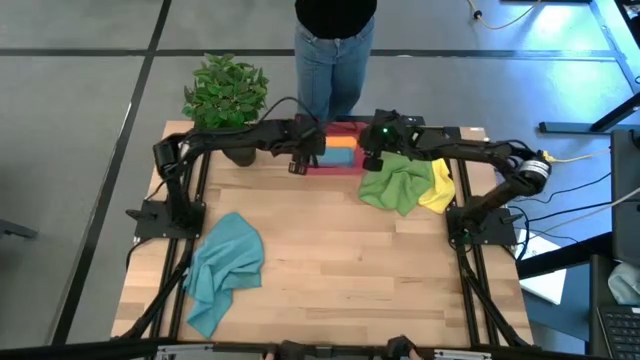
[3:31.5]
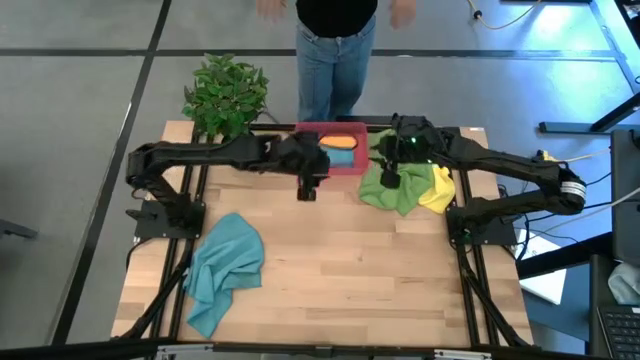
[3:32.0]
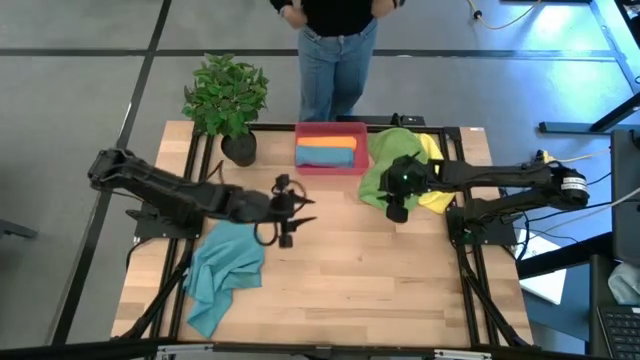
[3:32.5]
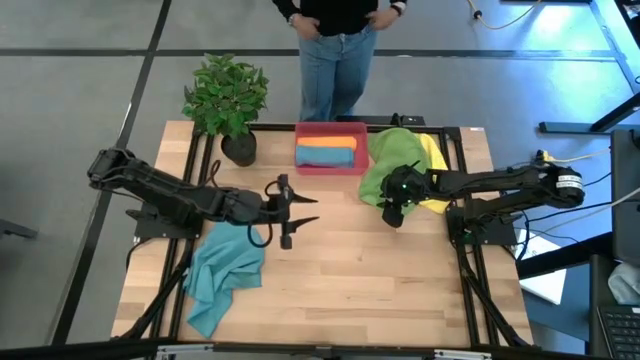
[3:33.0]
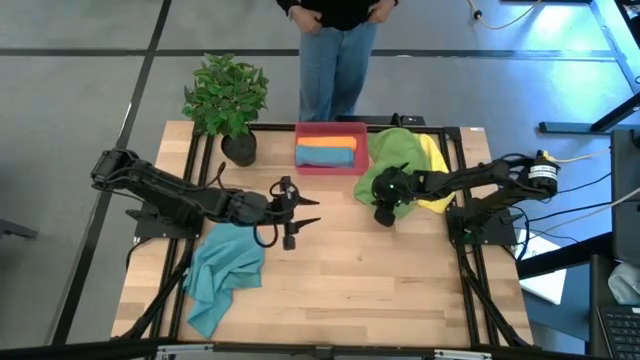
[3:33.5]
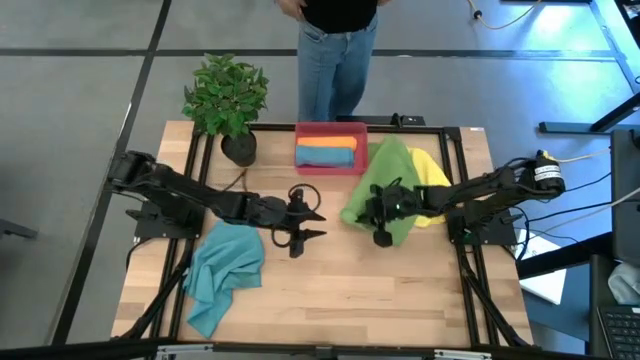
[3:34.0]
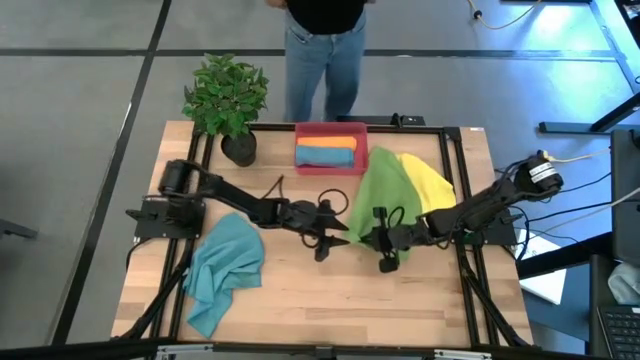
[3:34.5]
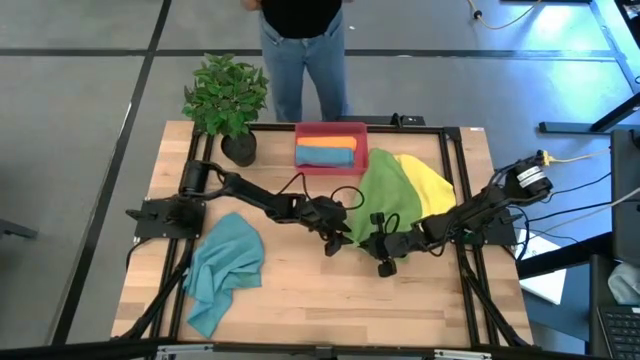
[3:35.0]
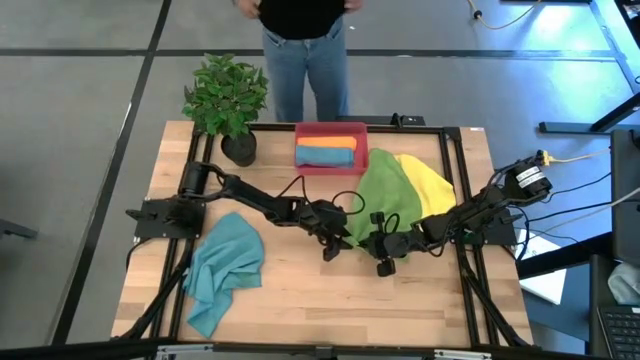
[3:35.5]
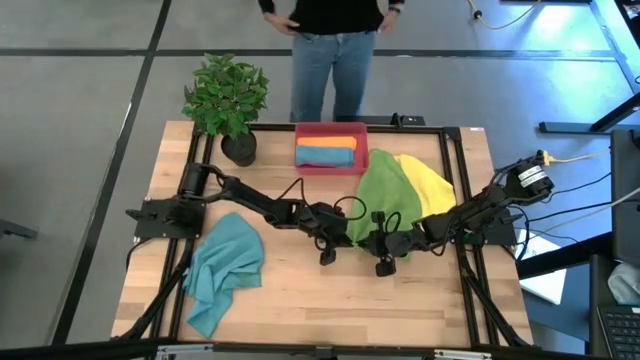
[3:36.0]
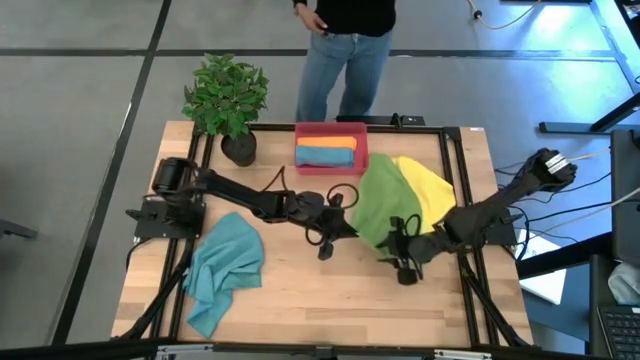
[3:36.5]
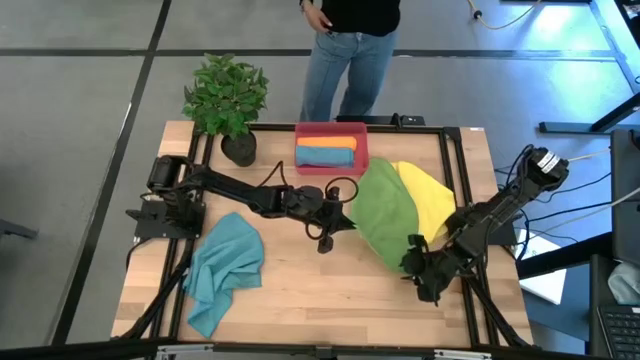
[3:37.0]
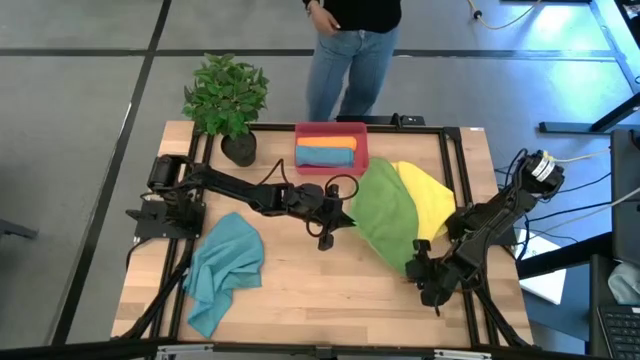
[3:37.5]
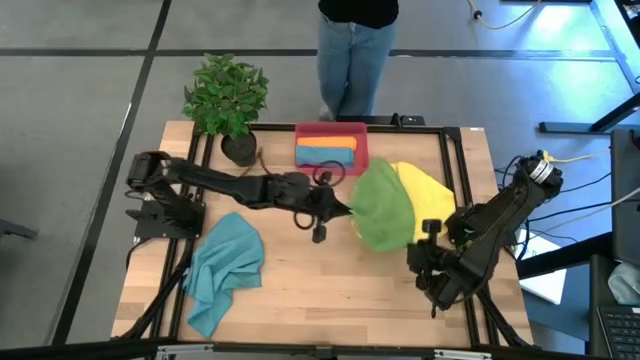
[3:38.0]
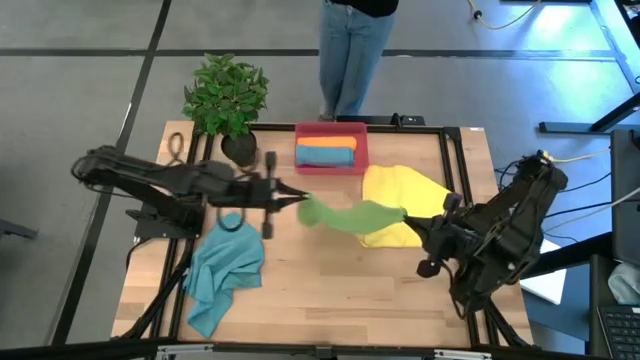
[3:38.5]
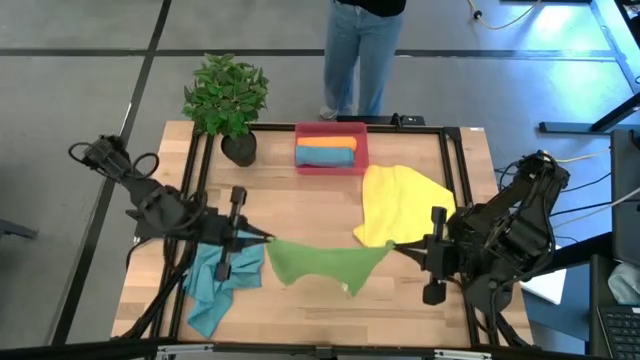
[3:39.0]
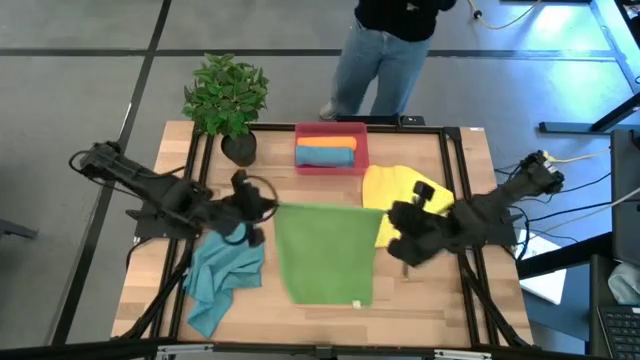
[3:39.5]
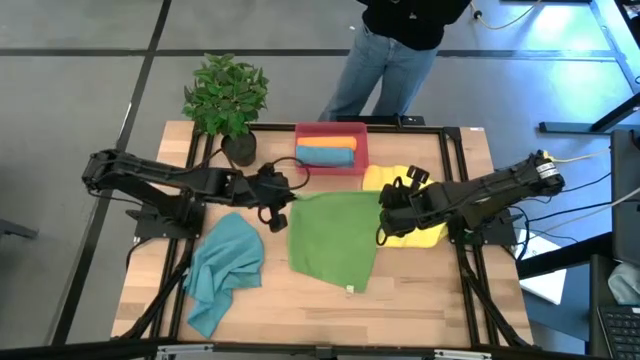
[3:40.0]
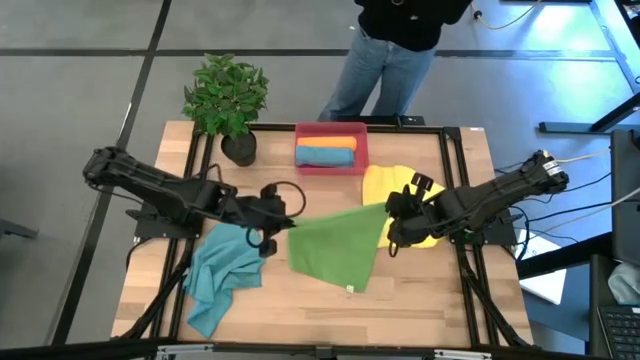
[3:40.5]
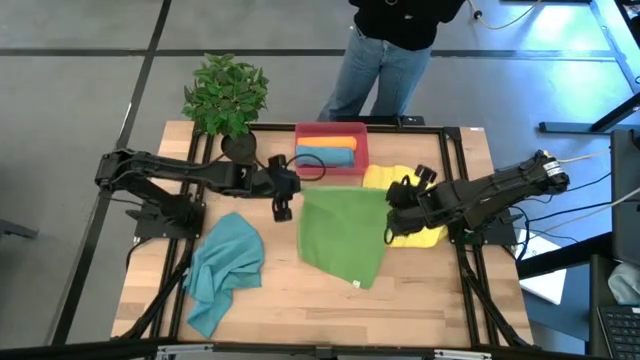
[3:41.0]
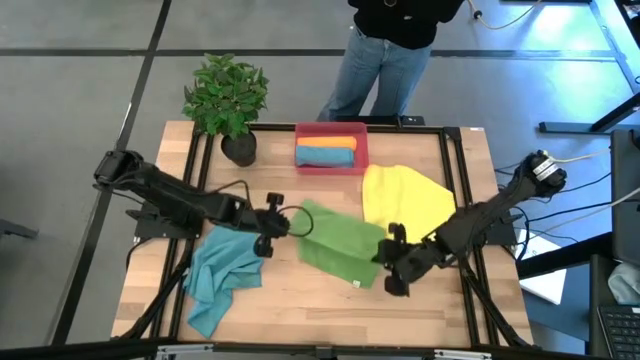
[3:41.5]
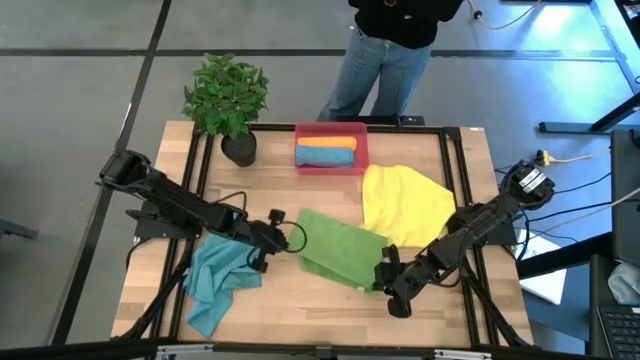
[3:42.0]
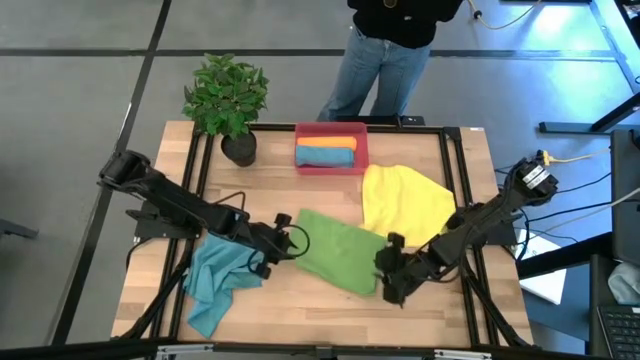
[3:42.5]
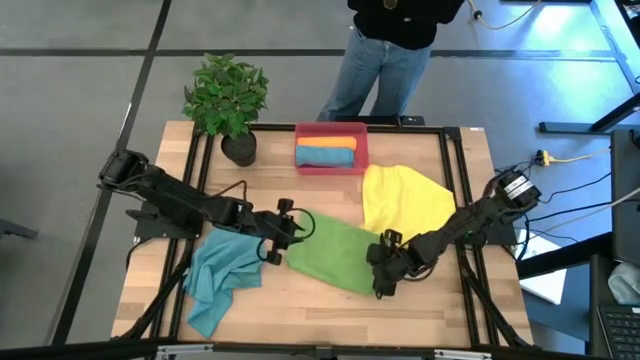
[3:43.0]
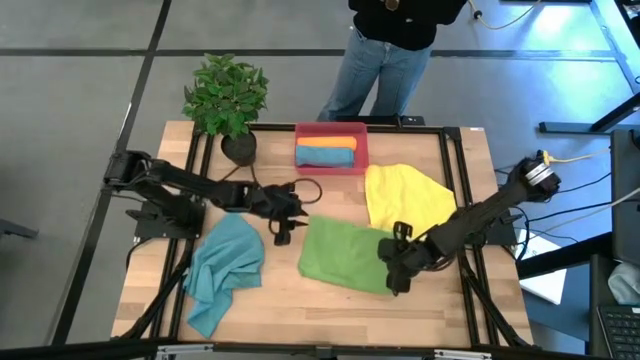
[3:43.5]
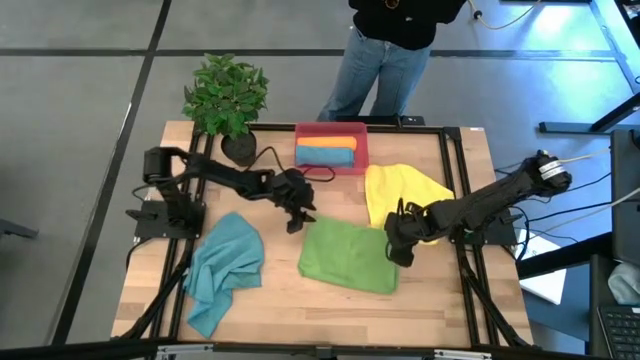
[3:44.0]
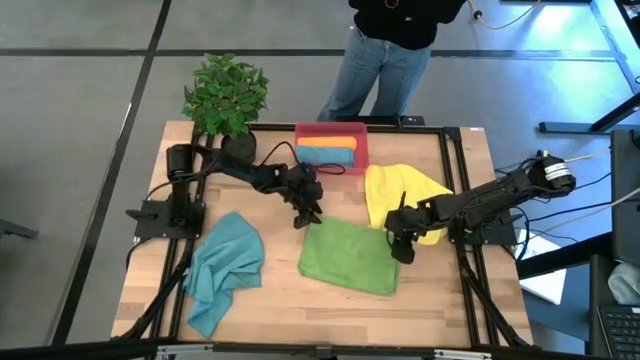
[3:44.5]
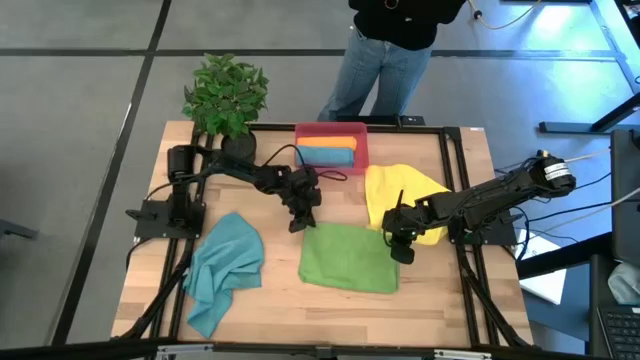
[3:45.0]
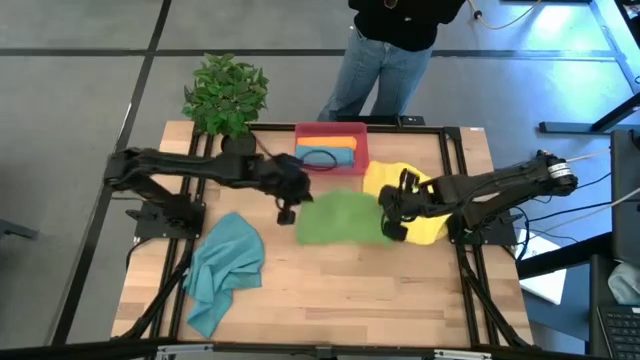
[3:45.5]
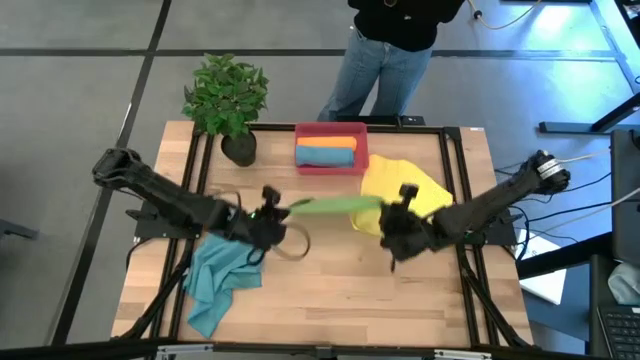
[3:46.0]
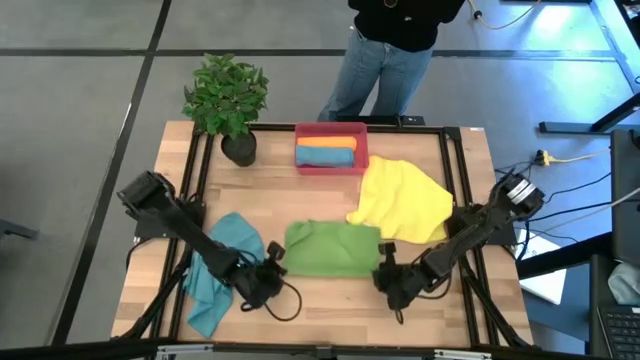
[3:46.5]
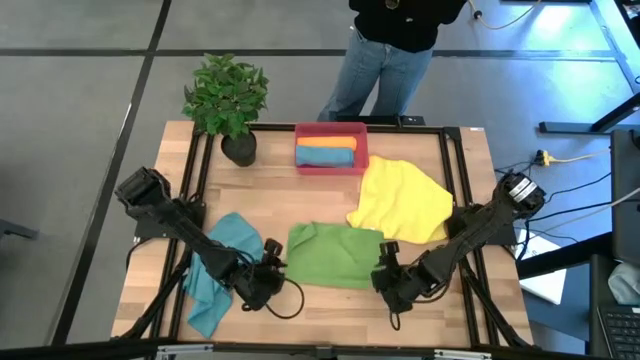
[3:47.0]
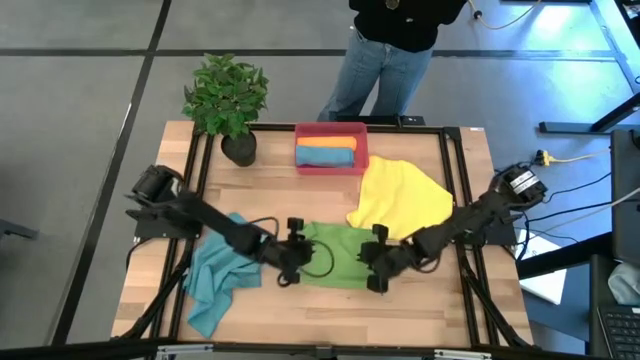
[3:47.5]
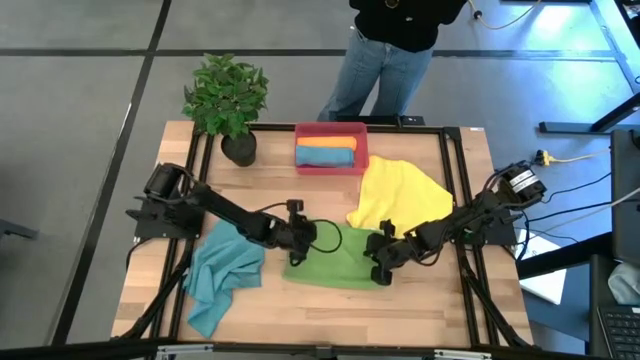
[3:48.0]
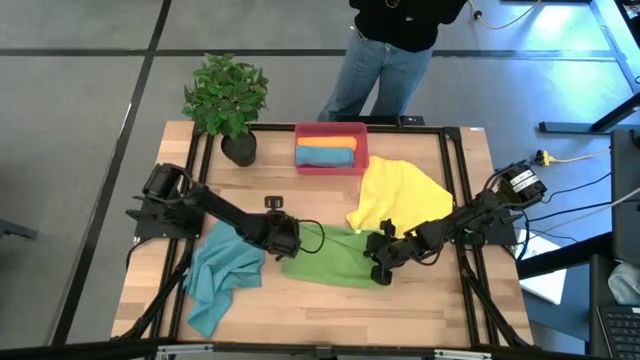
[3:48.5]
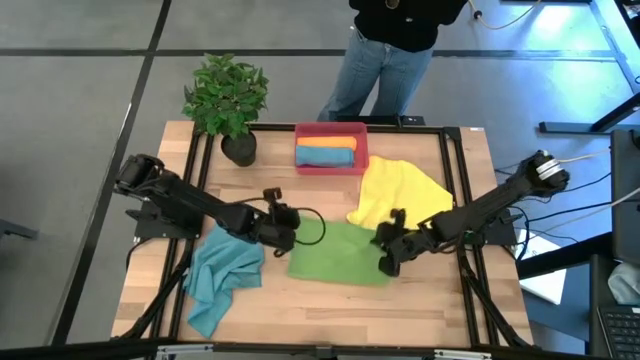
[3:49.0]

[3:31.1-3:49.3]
Task: Roll microfiber towels into tight, uniform cylinder then place into a basket
Fold the green towel

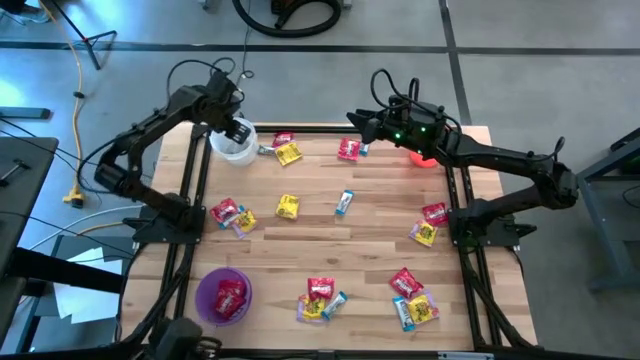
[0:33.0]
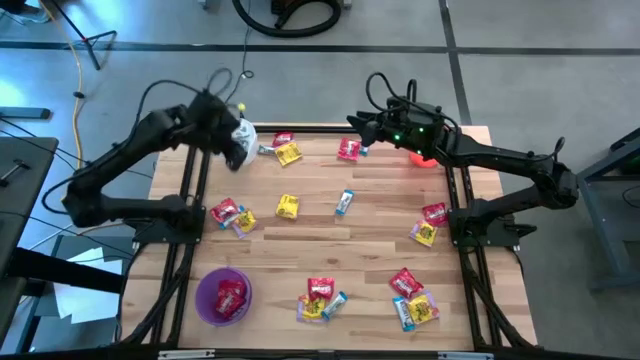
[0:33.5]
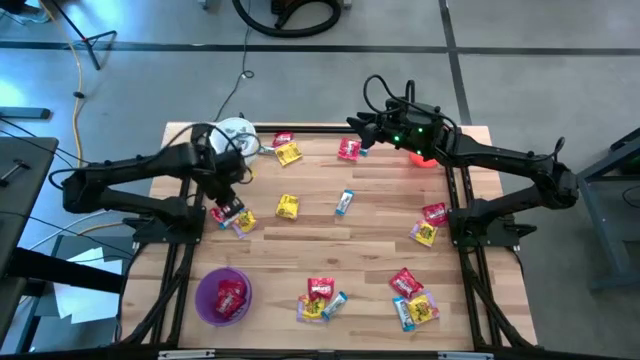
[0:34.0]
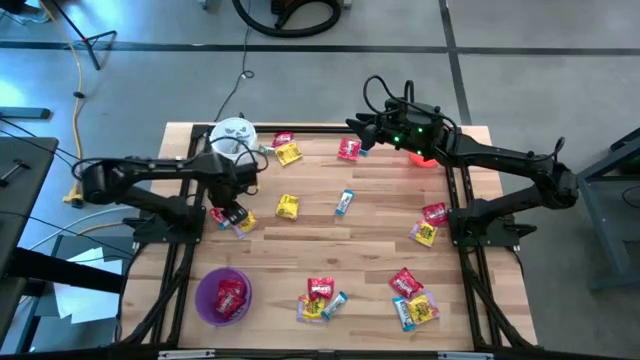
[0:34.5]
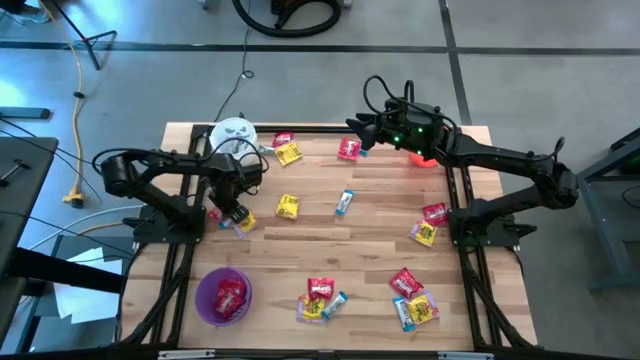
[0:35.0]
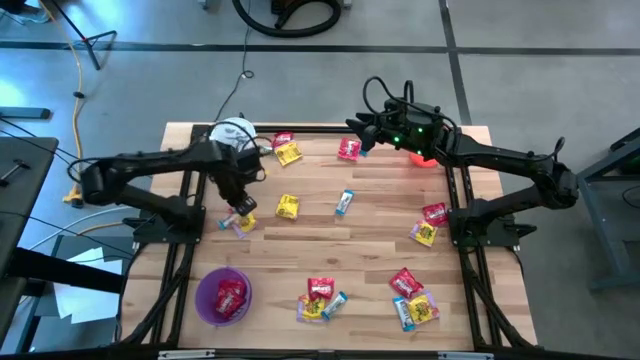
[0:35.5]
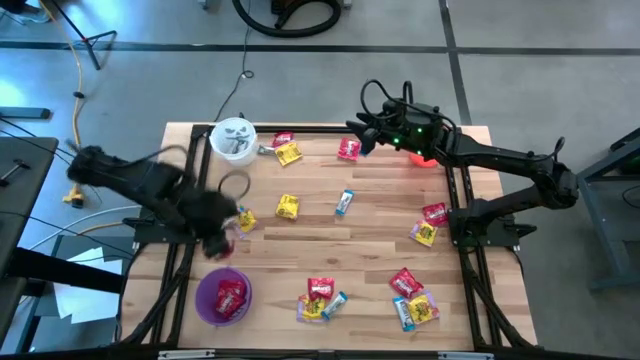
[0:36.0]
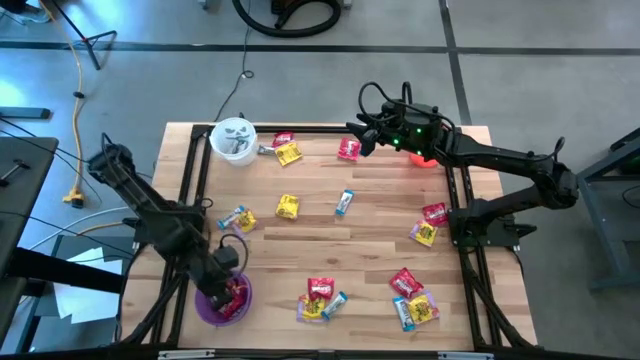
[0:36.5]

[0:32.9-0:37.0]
Task: Sort candy
Put the red candy into the purple bucket
